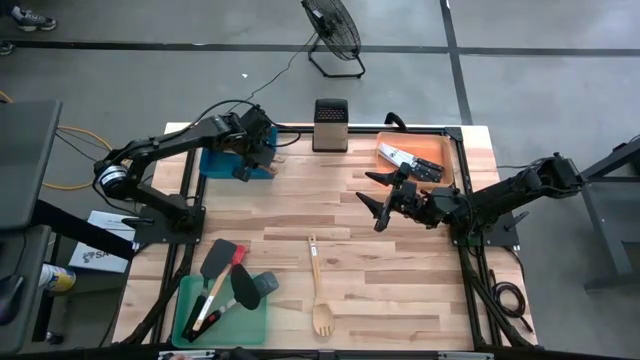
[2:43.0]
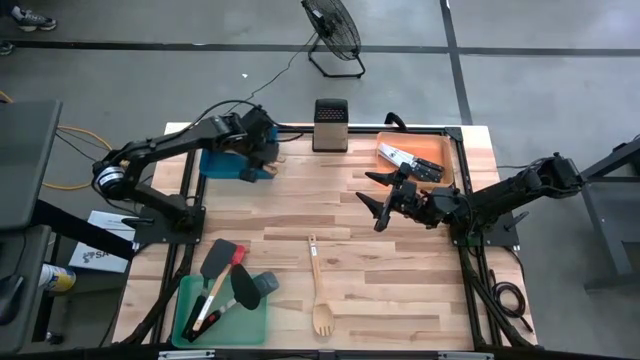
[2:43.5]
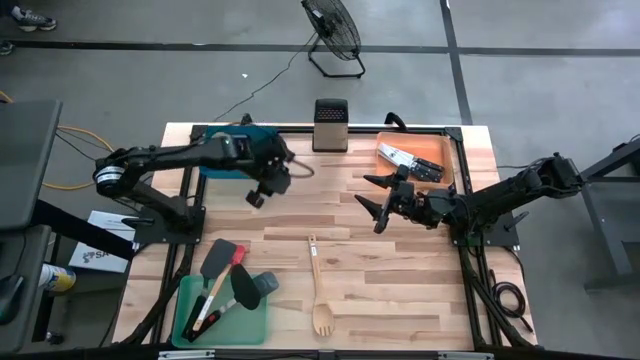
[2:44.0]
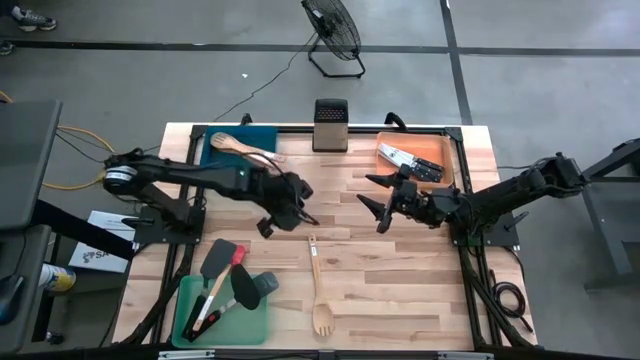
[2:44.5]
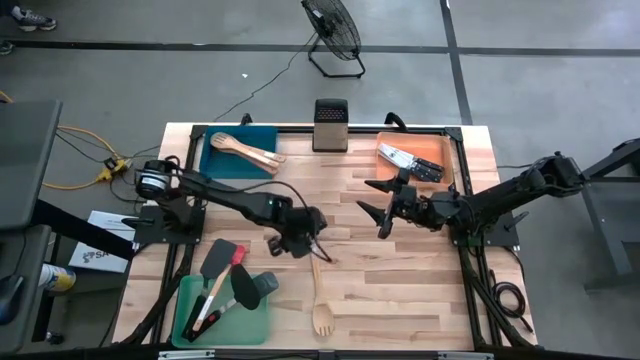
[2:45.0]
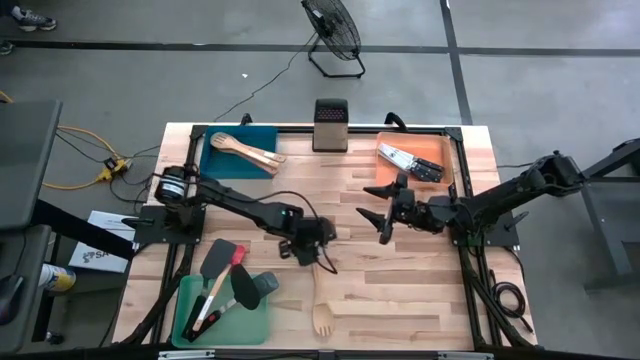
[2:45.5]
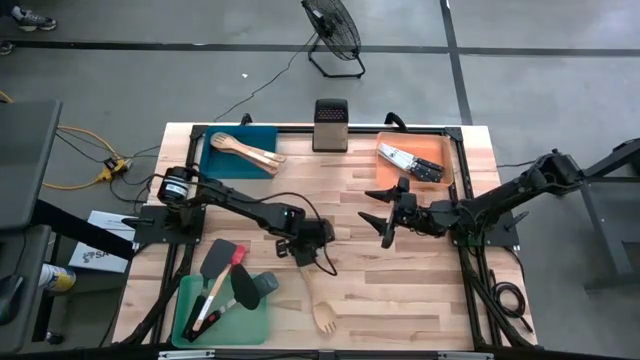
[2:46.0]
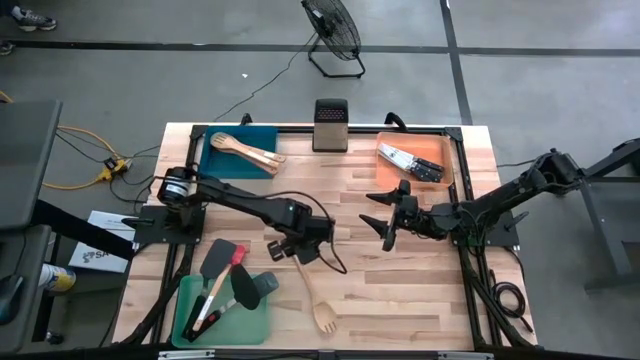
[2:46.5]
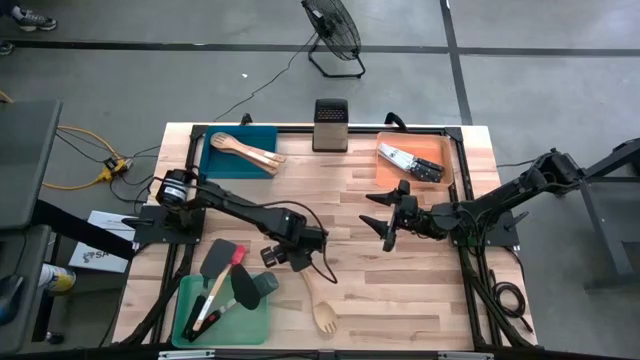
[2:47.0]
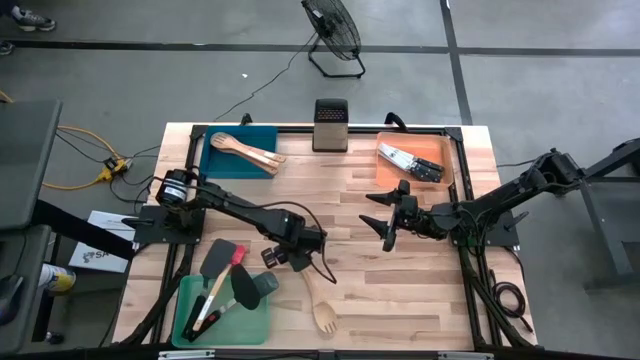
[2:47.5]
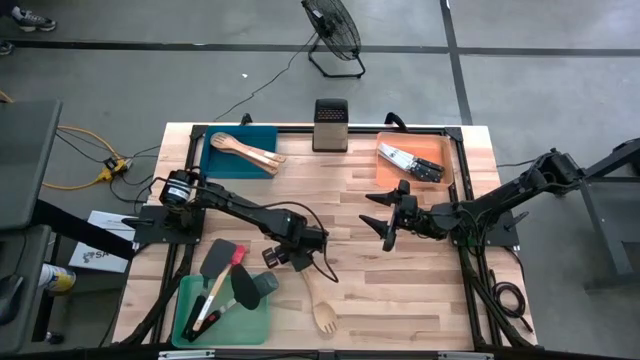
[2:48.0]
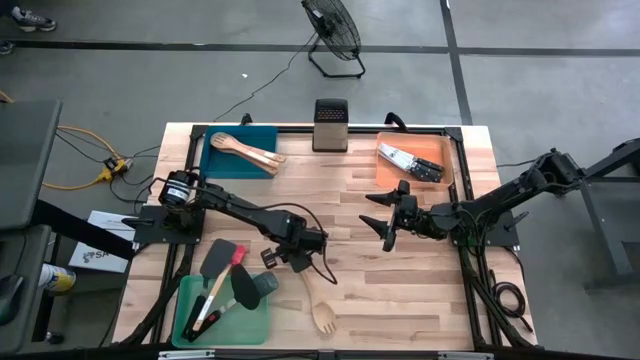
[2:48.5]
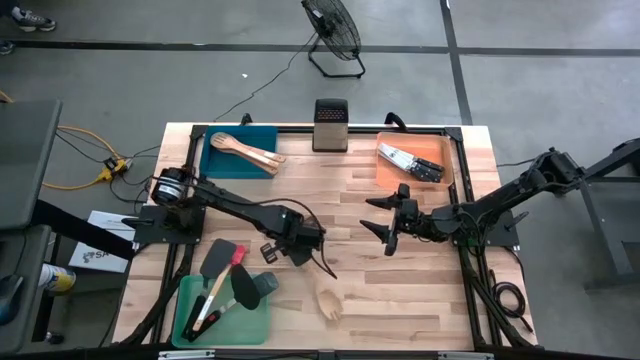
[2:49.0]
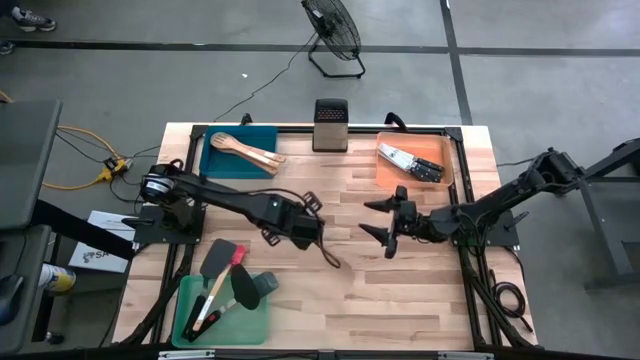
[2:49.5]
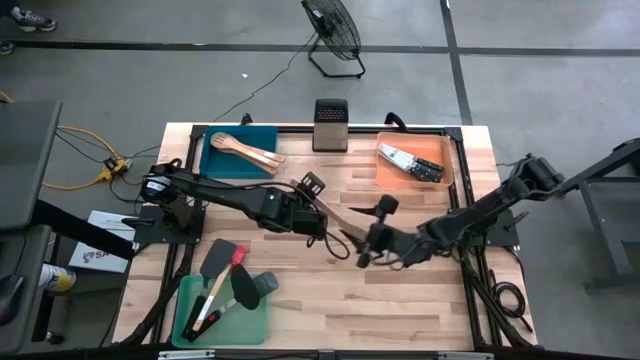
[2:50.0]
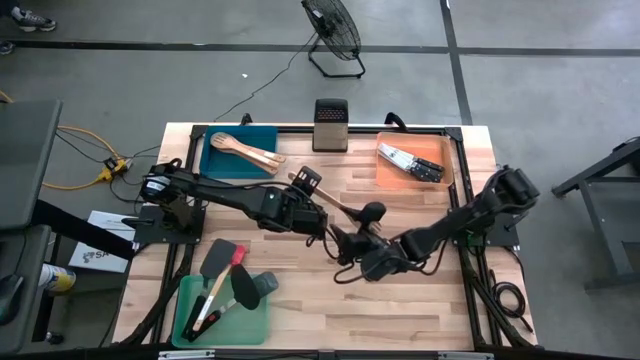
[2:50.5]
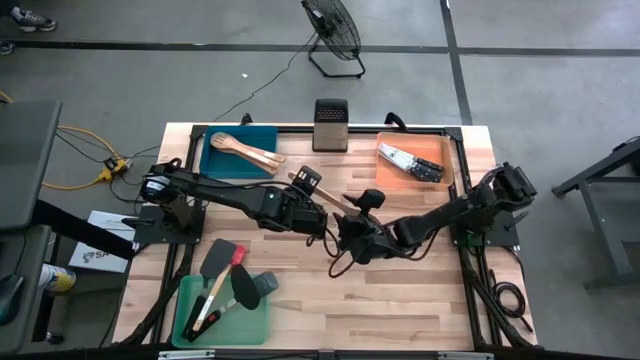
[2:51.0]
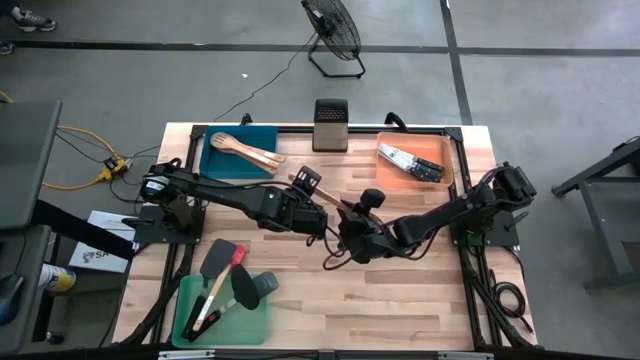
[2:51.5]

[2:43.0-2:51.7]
Task: Pick & Place Kitchen Items
Put the brown wooden spoon into the blue bin

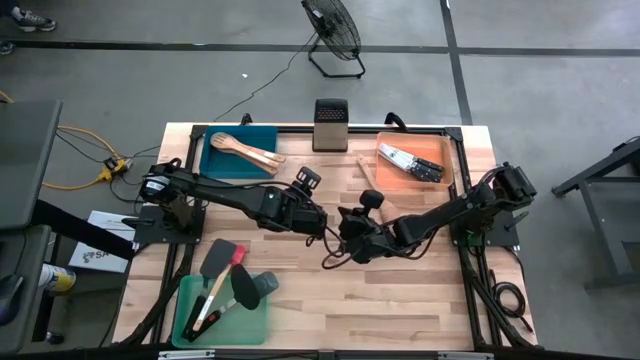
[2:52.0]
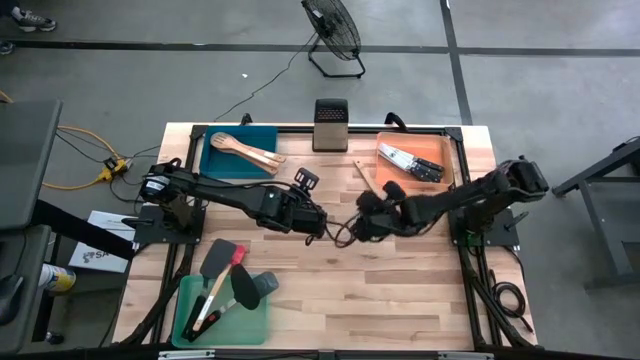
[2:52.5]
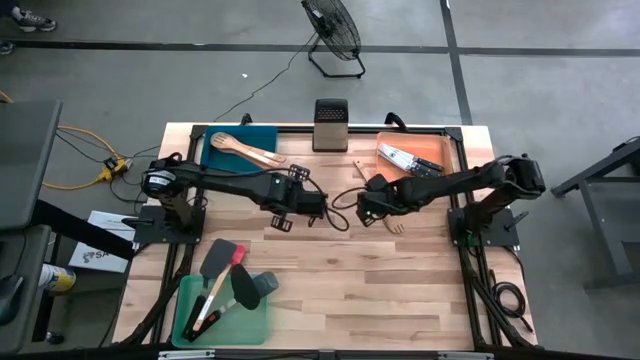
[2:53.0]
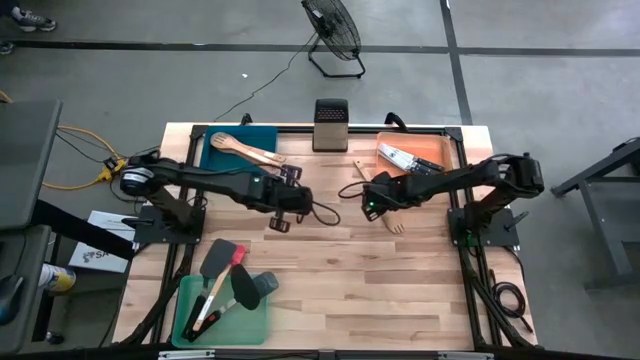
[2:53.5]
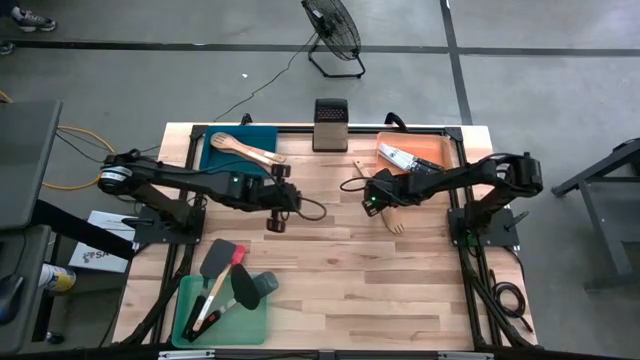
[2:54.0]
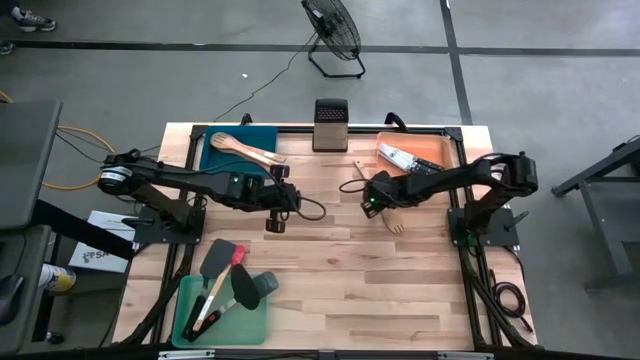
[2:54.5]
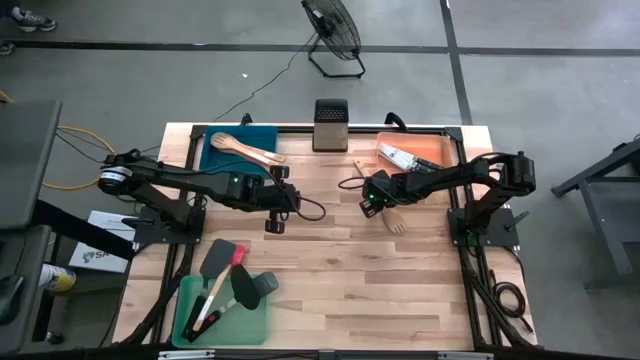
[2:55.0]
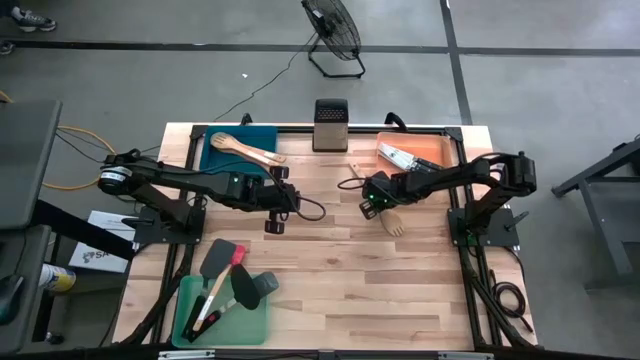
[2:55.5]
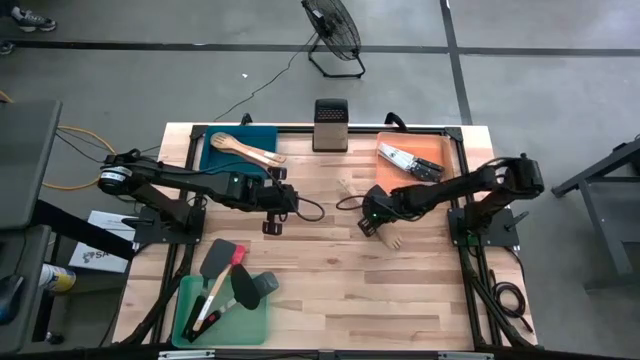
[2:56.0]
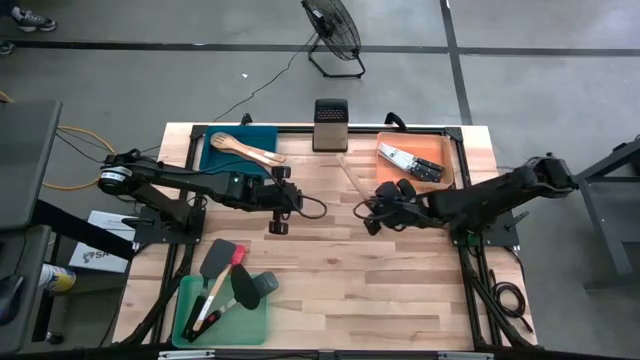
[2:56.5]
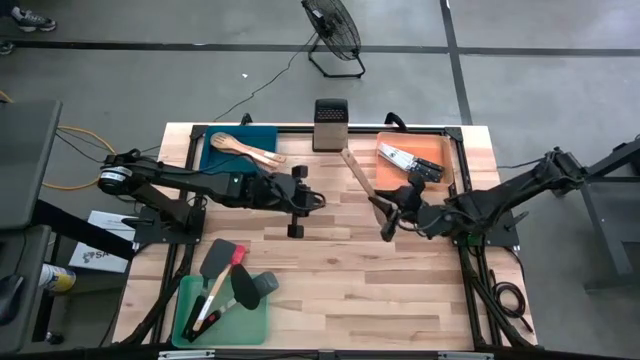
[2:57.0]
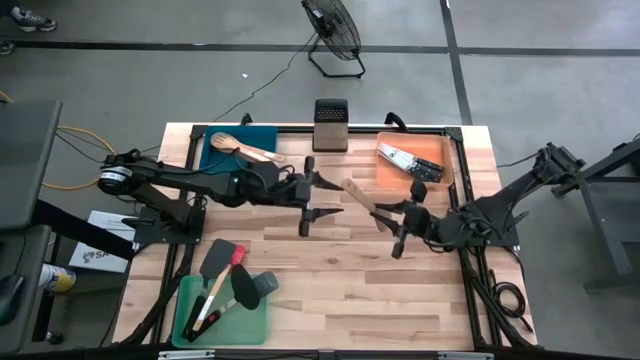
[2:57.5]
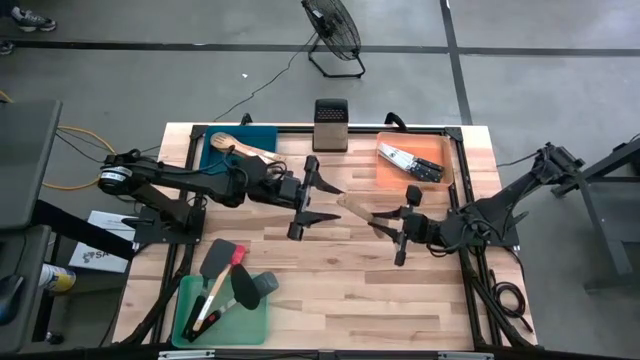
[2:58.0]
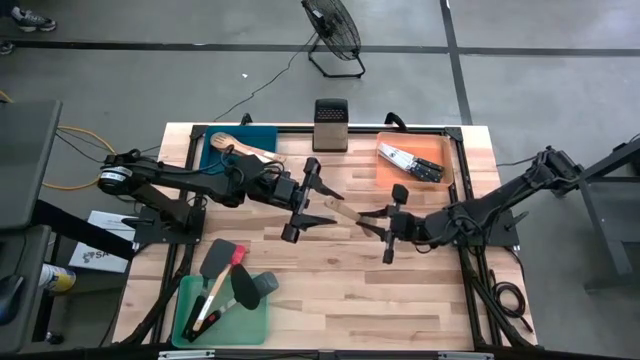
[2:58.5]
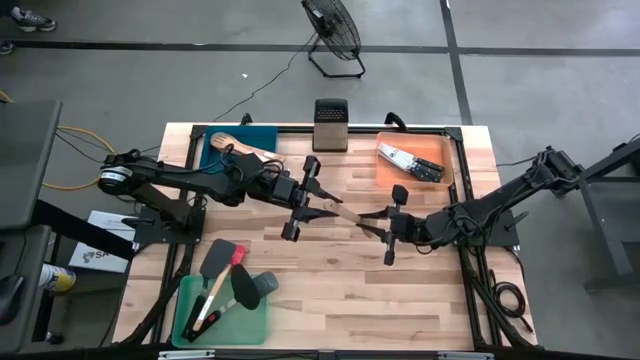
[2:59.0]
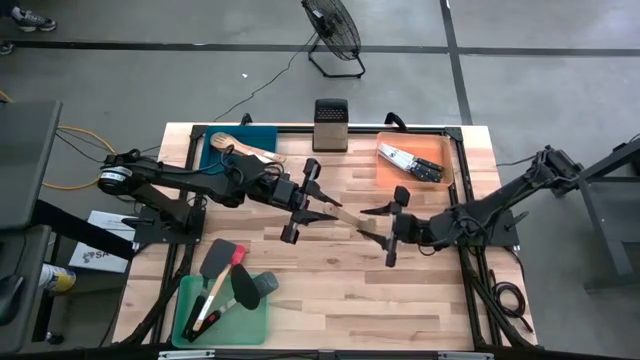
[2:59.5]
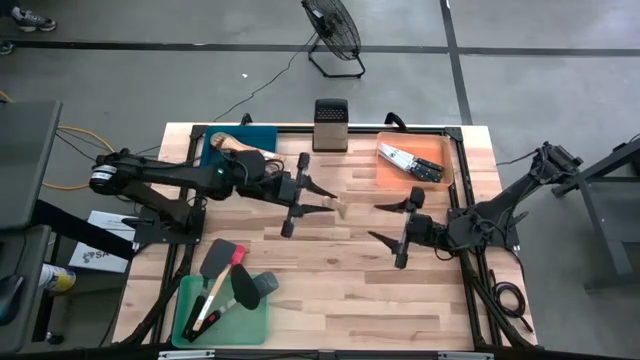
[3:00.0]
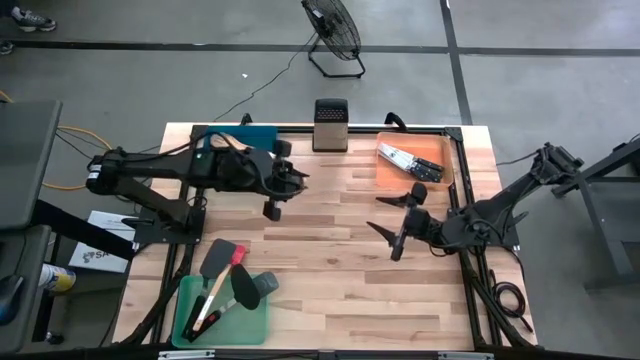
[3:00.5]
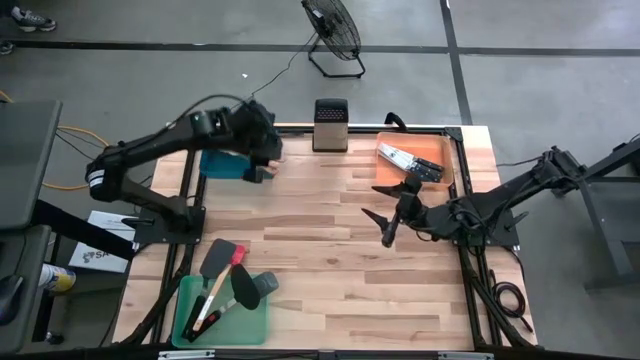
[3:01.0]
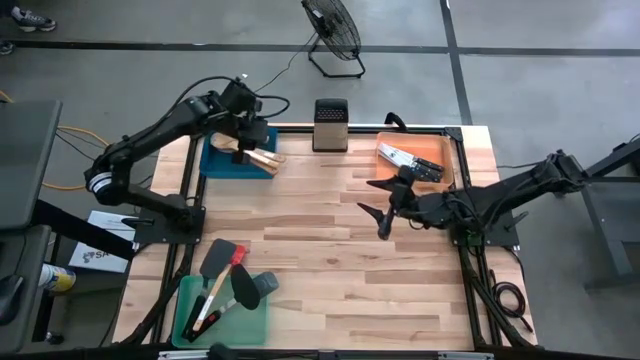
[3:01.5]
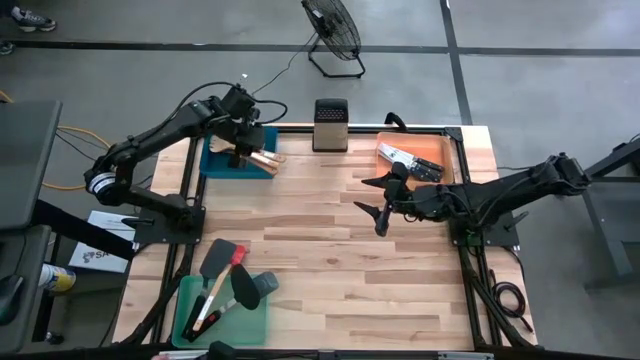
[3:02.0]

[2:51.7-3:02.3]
Put the brown wooden spoon into the blue bin

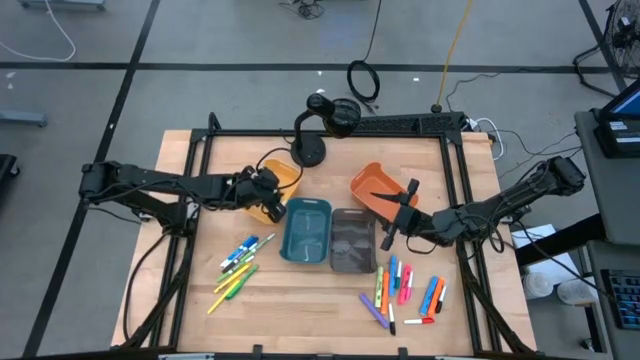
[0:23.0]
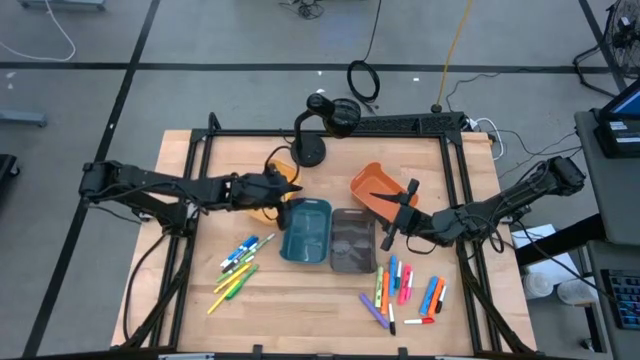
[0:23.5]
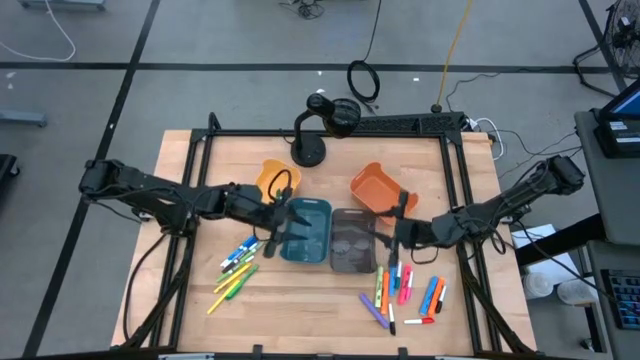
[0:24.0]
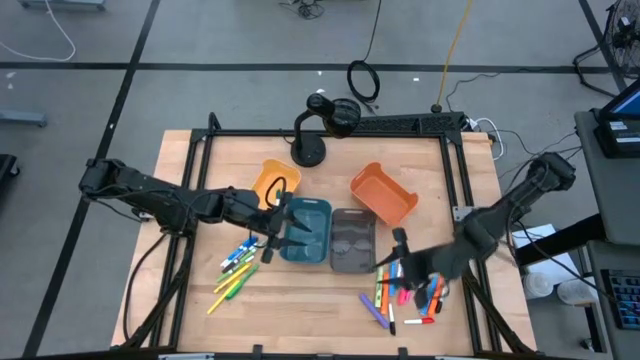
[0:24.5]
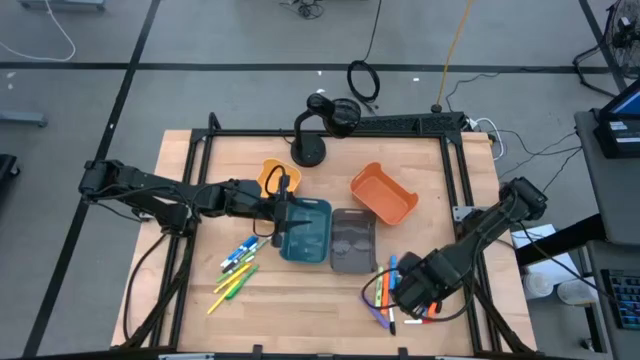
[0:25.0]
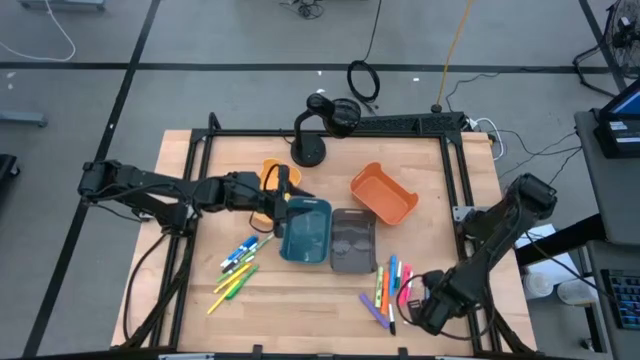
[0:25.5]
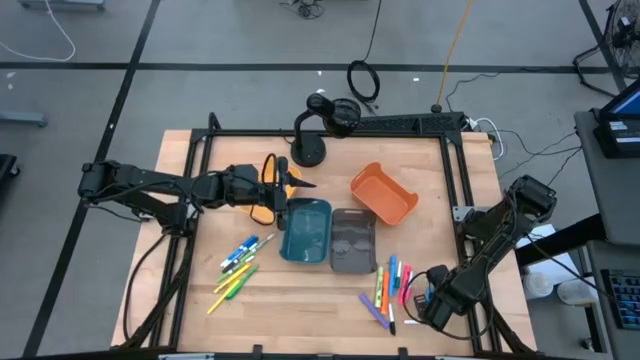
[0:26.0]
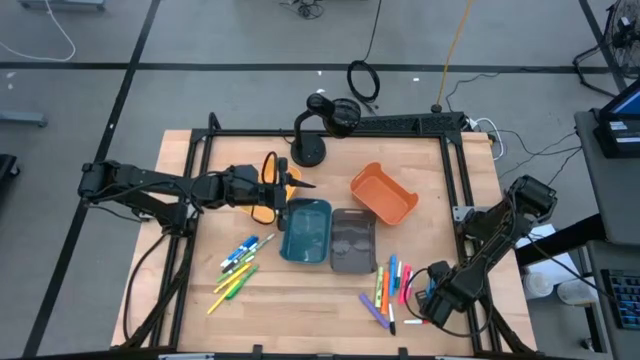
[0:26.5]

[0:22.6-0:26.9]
Task: Pick & Place Markers
Put the right white and black highlighter into the yellow bin
